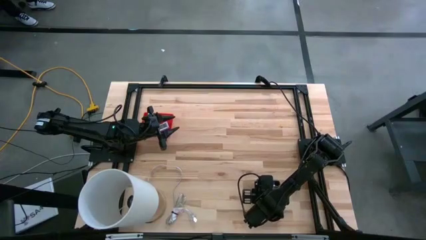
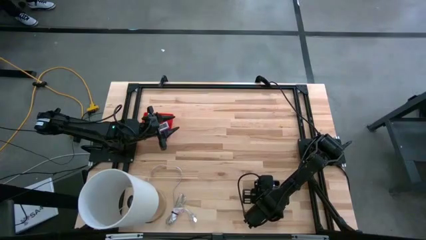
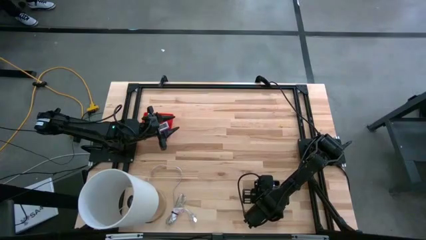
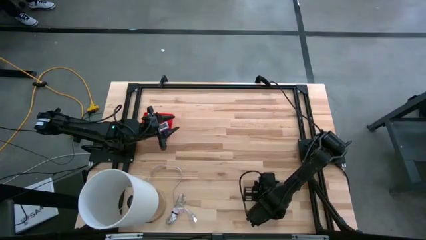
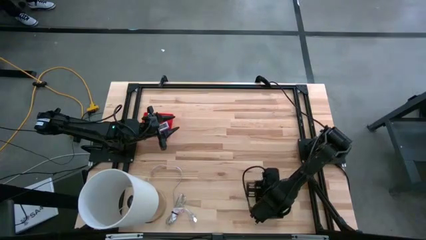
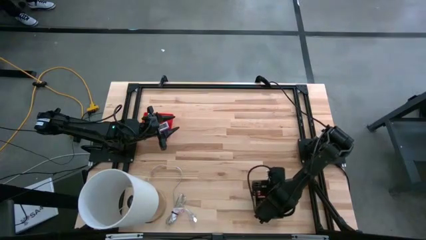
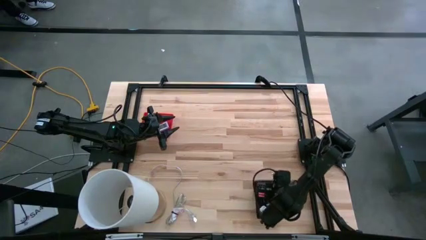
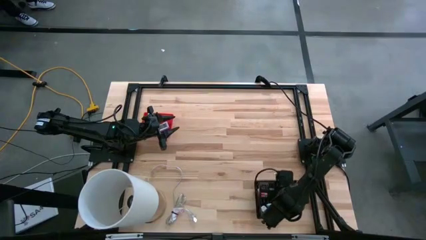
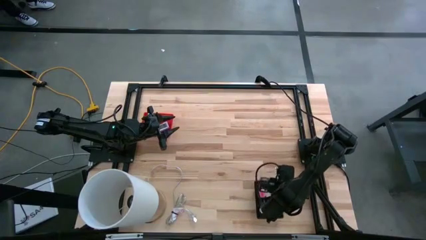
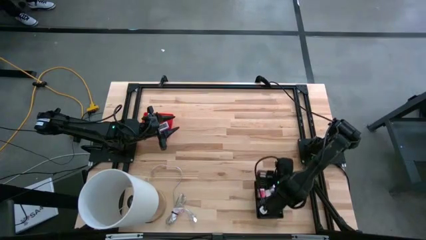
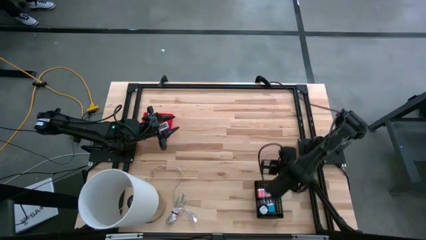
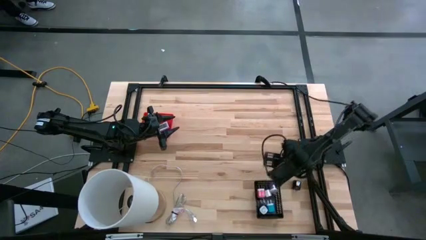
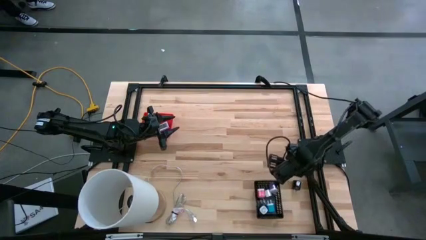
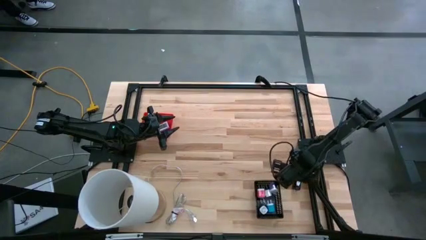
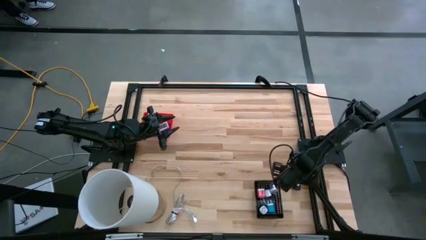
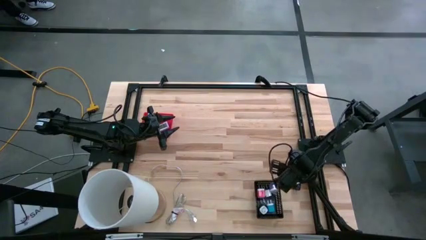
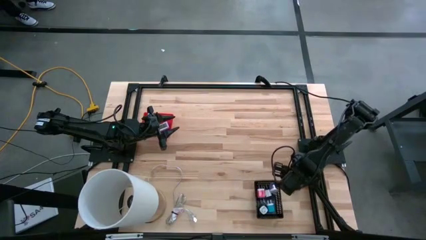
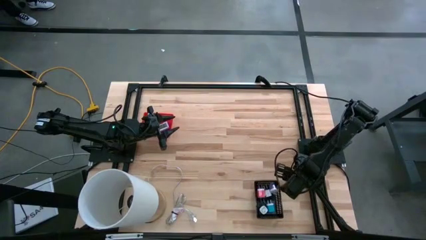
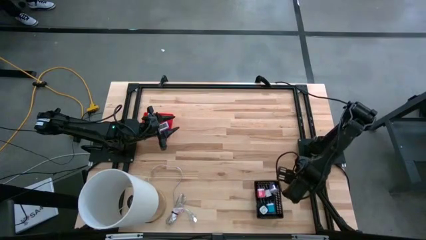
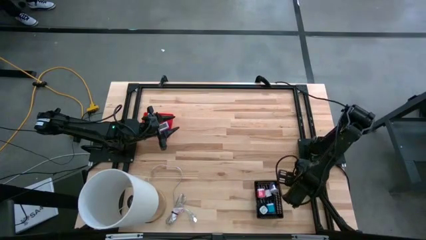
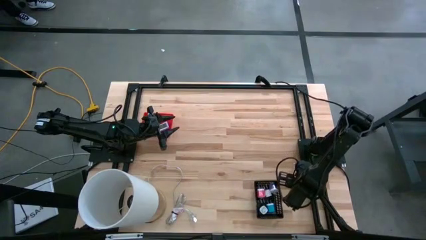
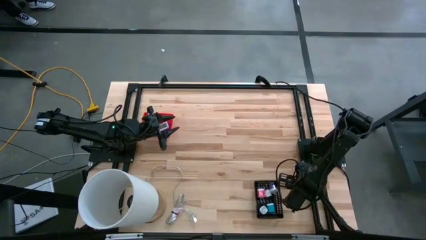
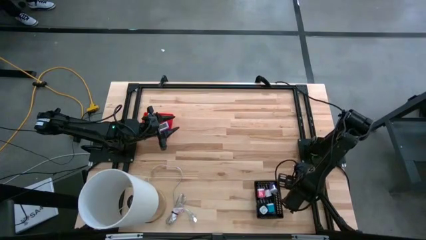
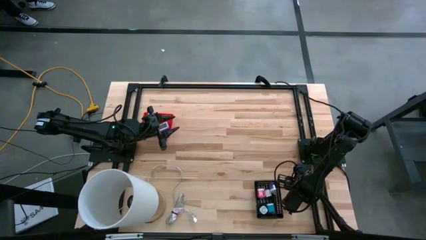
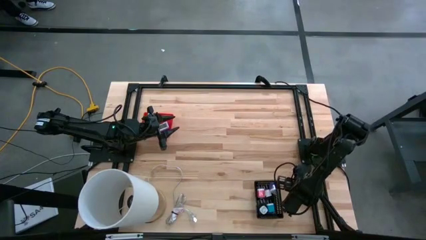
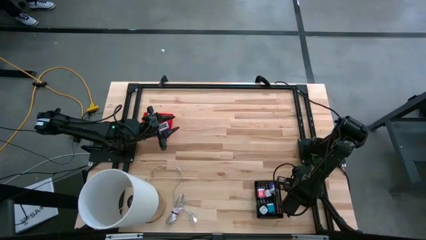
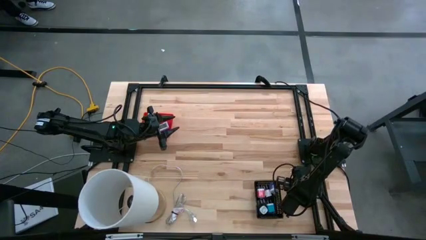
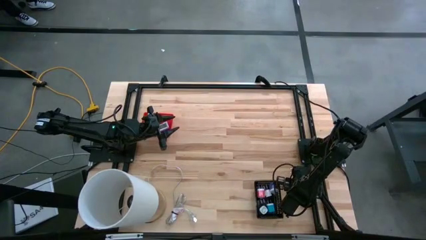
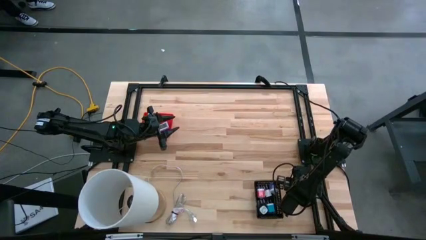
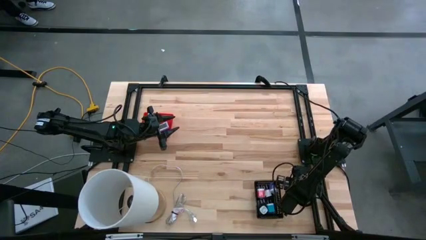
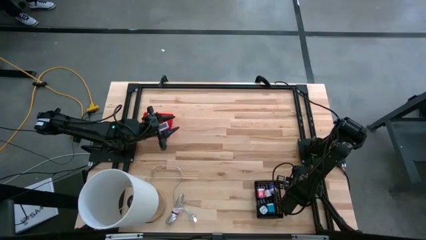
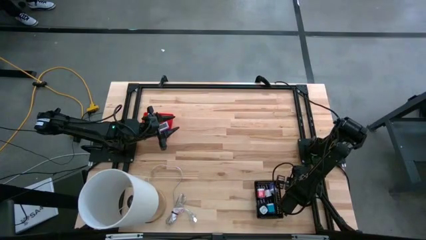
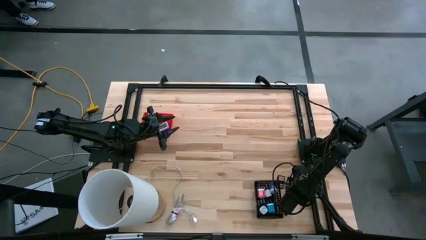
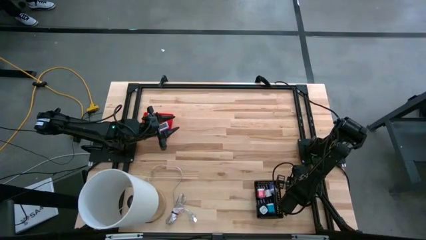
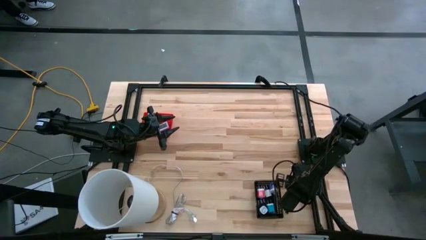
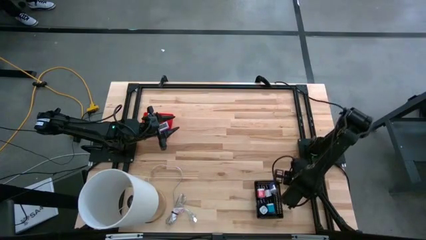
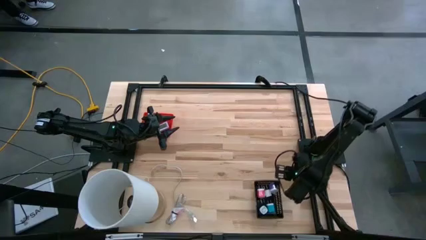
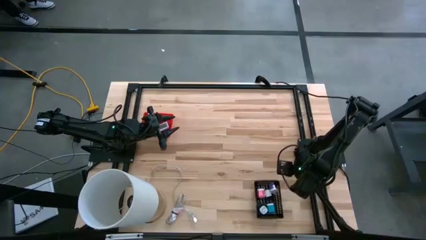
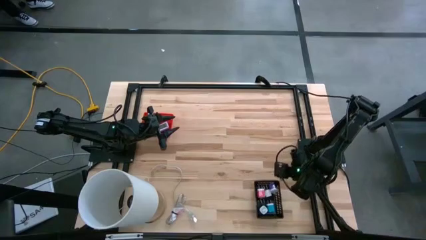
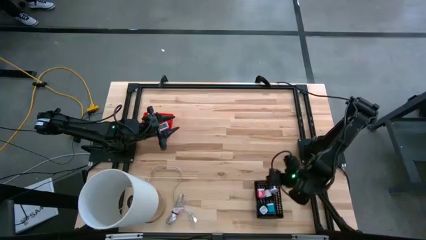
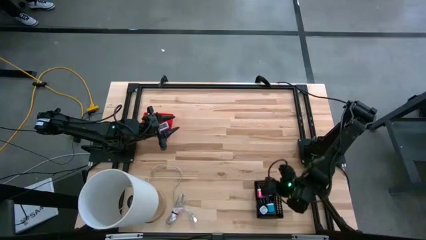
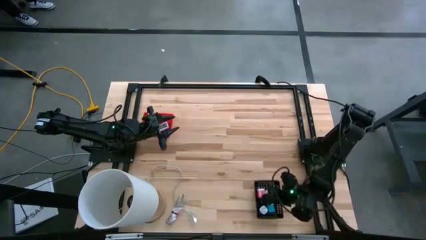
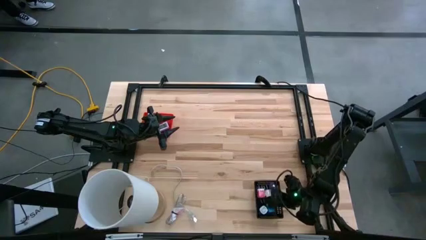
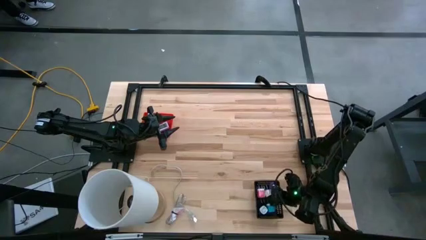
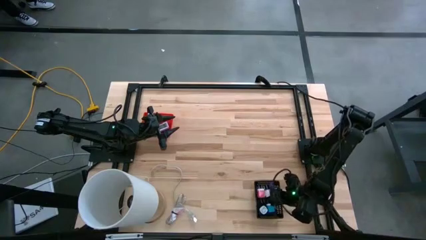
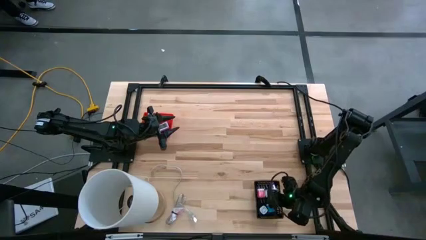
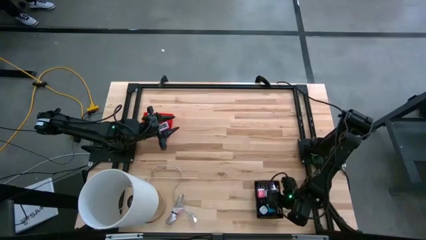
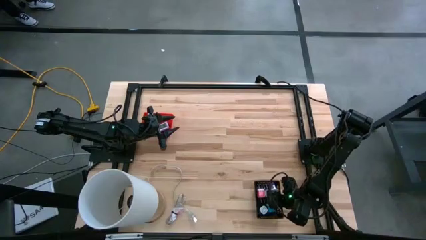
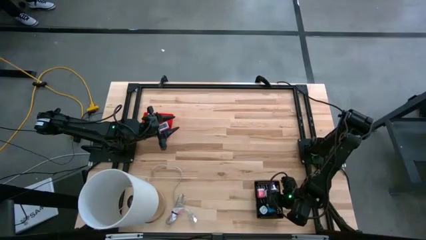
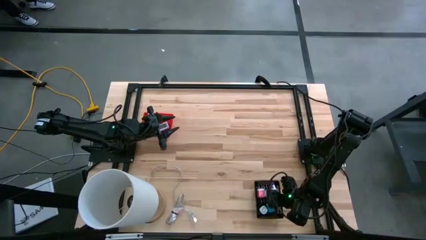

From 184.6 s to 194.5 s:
Task: Pick & Place Office items
Put the black charger adapter into the black bin
